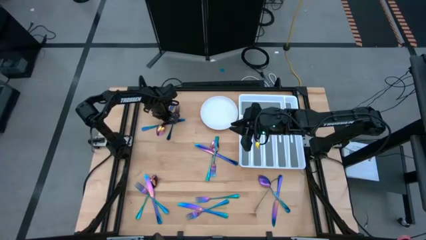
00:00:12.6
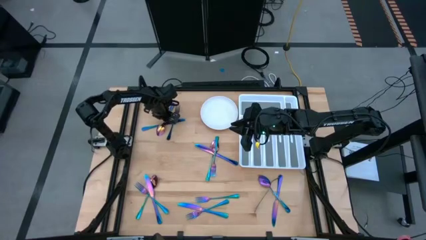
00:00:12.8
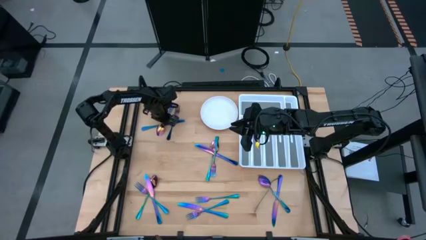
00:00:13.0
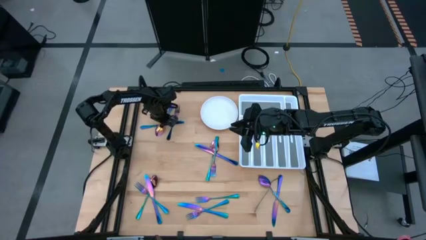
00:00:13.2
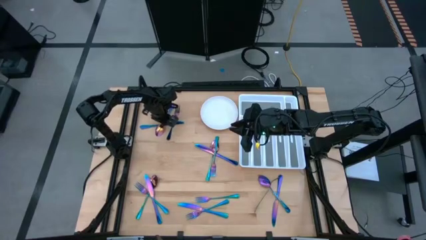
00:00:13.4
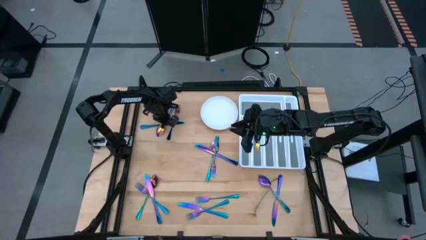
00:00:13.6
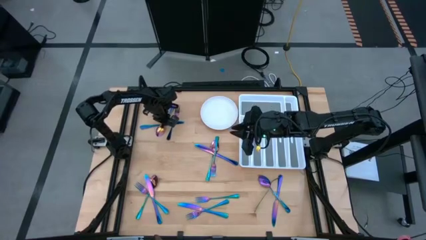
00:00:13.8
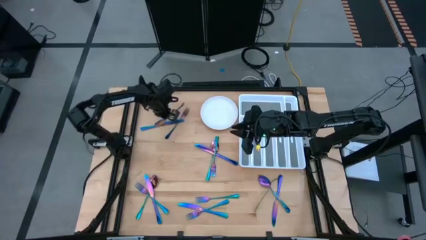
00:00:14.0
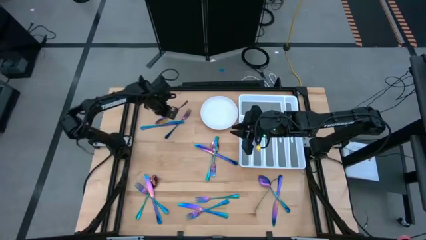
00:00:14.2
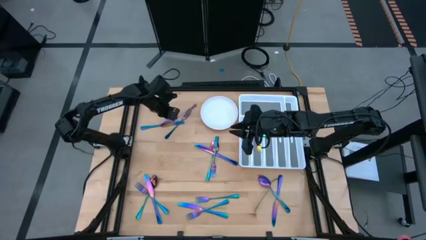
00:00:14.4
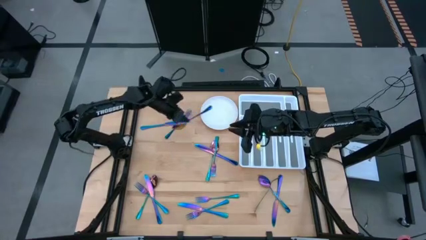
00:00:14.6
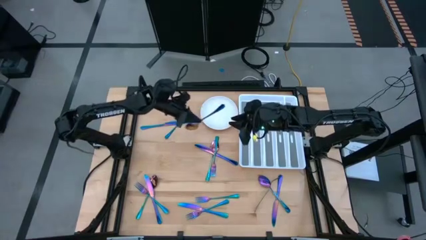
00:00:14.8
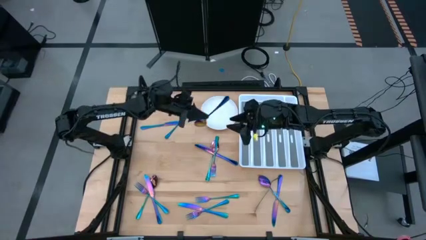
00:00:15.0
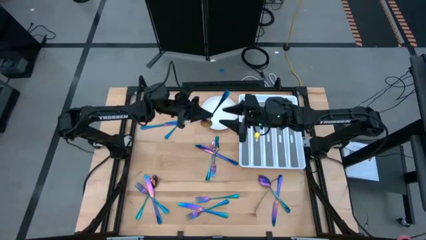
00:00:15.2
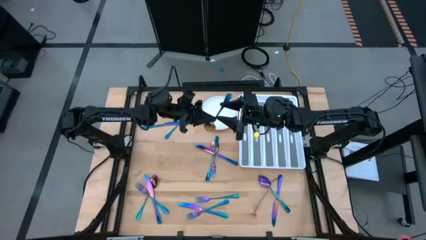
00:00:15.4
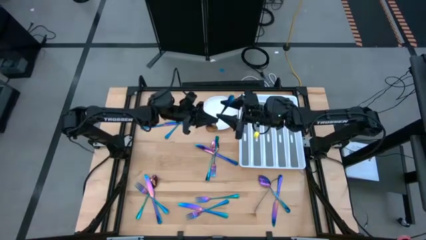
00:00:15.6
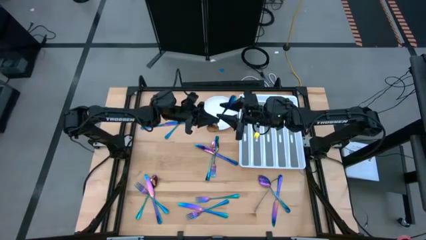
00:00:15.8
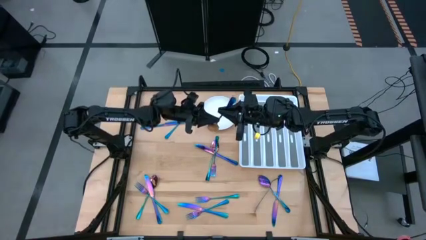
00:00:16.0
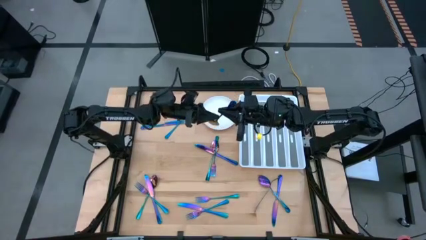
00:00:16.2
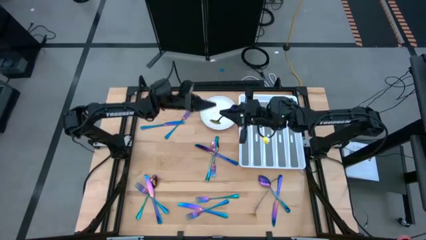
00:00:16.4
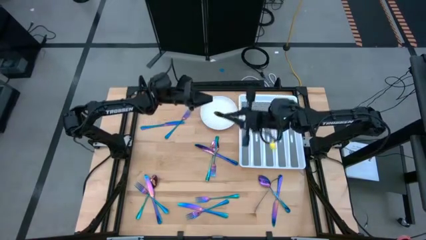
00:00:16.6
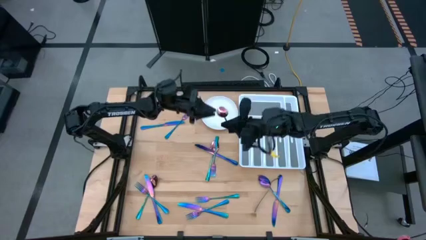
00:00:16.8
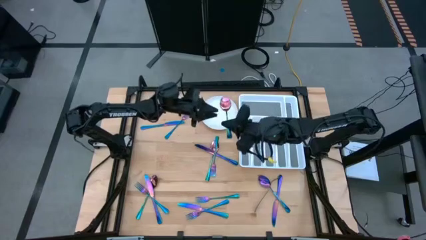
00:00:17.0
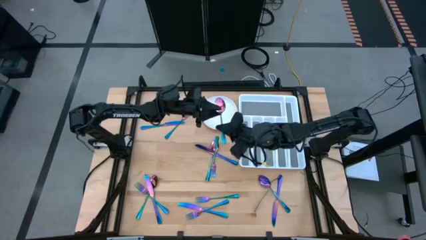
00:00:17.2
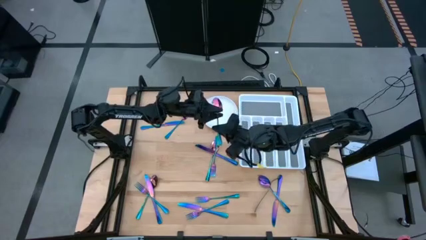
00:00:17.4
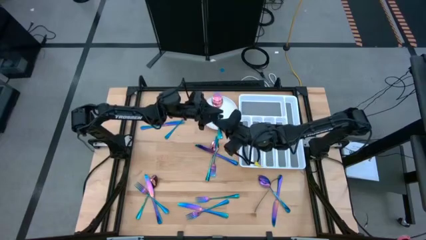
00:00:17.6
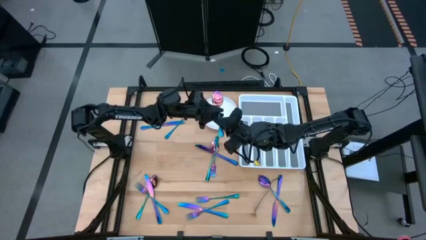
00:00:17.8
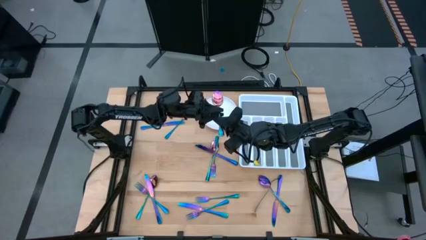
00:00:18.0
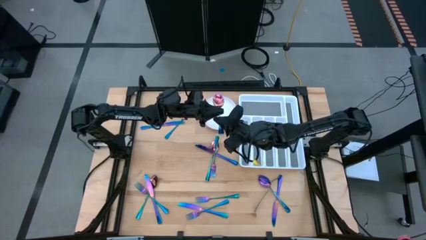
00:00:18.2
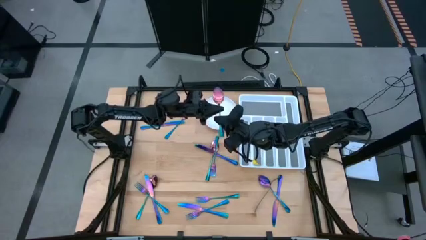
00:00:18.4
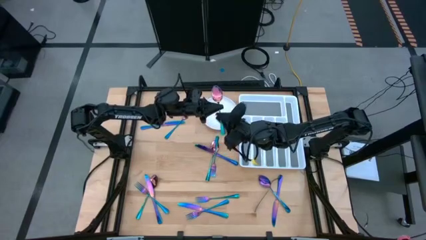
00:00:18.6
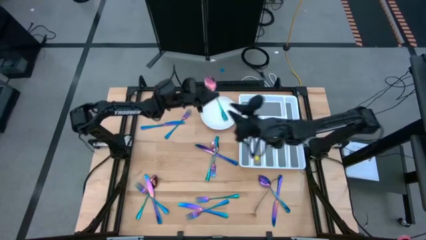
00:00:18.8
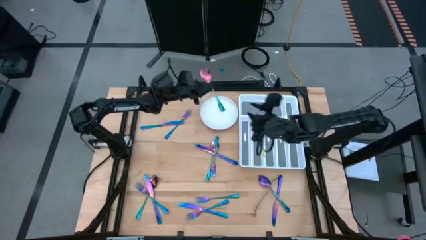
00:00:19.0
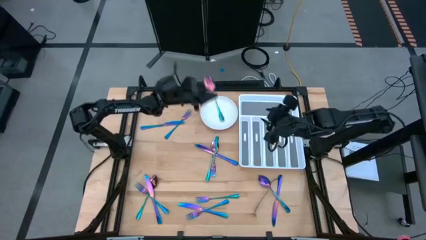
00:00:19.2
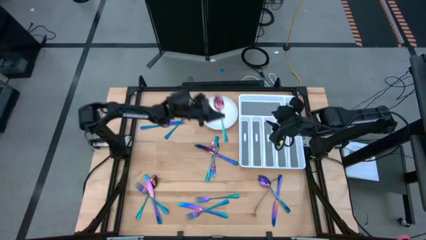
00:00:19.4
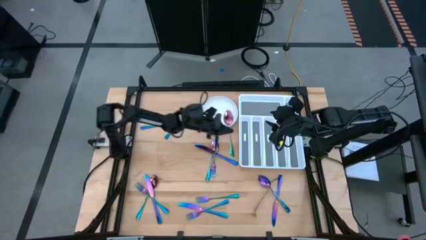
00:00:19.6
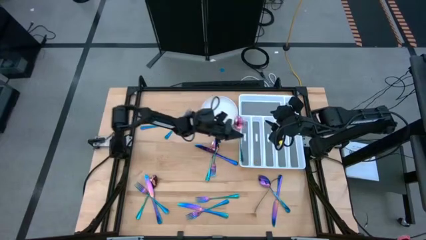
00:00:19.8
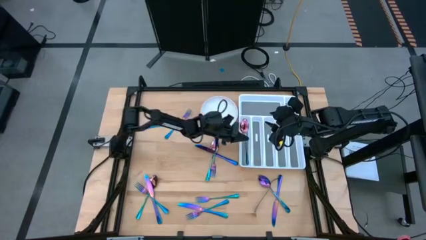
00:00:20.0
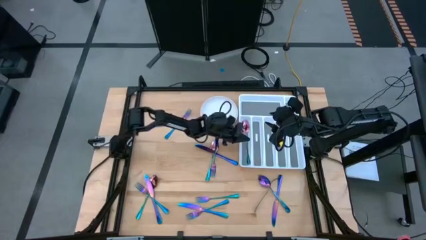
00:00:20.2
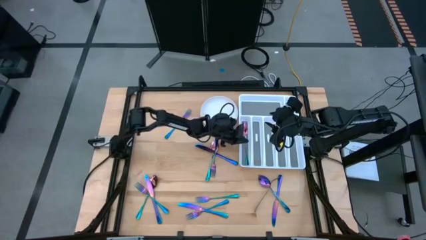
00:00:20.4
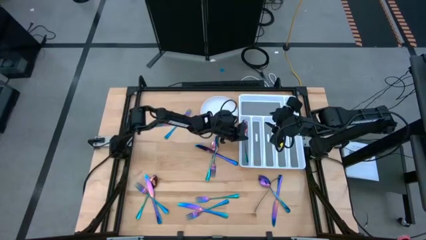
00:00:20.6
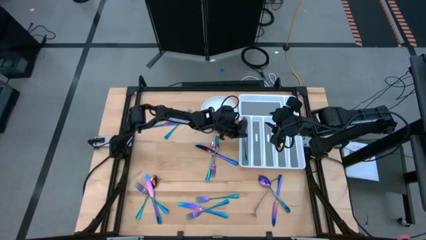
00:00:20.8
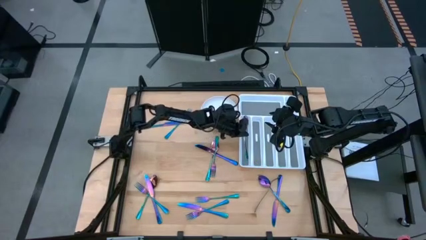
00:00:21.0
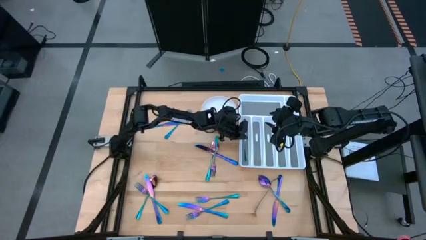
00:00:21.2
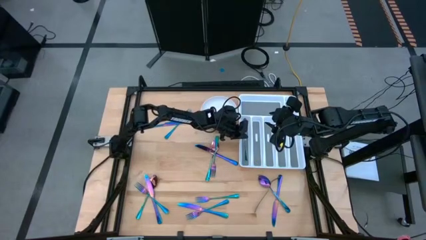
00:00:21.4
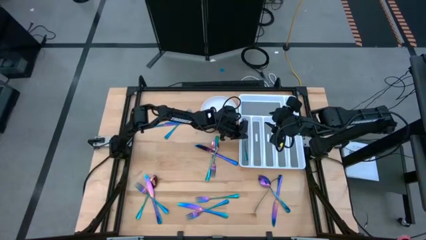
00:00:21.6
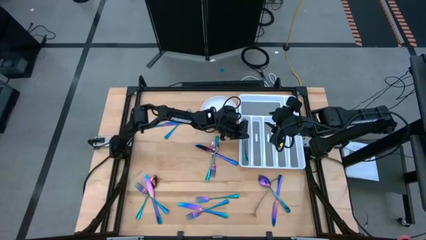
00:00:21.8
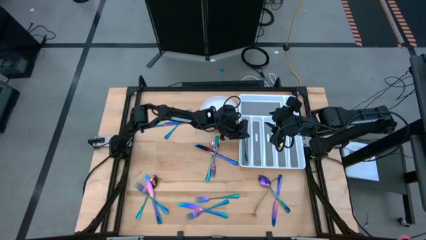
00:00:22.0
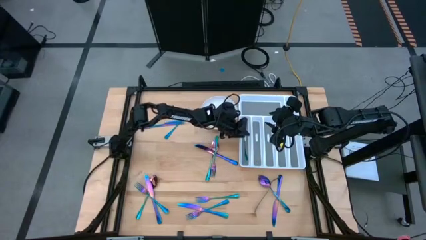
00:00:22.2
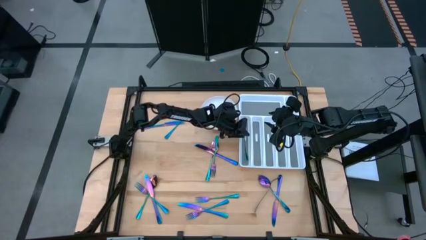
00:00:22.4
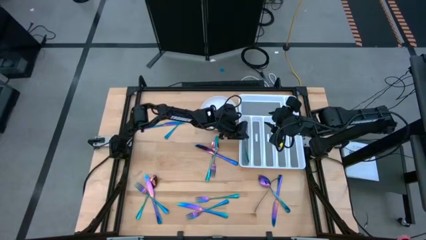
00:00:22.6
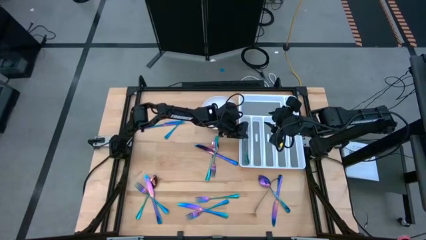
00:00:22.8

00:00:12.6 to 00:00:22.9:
Task: Sort silverware
Put the purple spoon into the white silverware tray

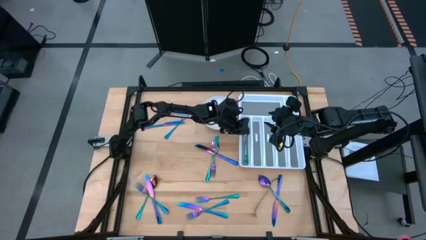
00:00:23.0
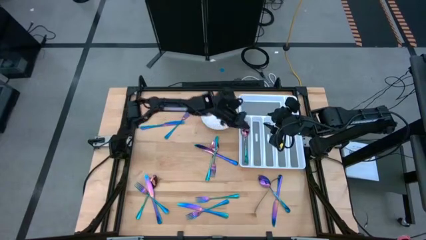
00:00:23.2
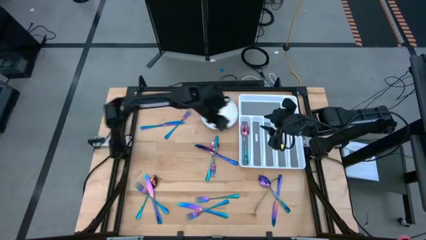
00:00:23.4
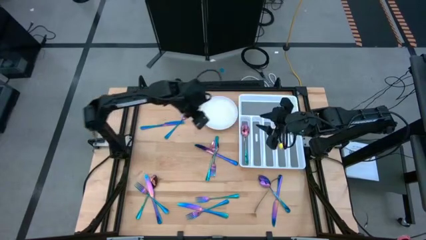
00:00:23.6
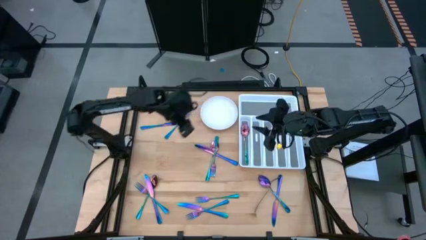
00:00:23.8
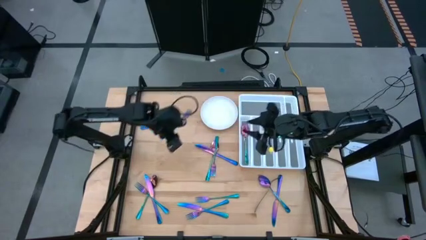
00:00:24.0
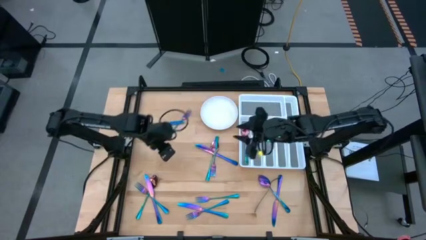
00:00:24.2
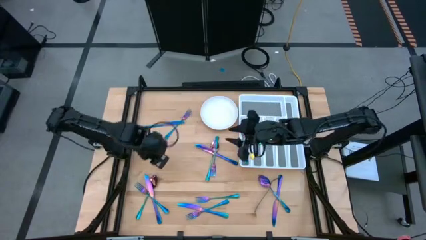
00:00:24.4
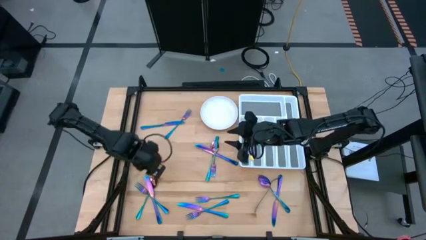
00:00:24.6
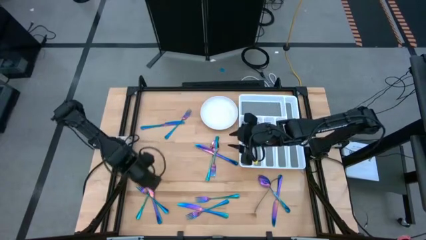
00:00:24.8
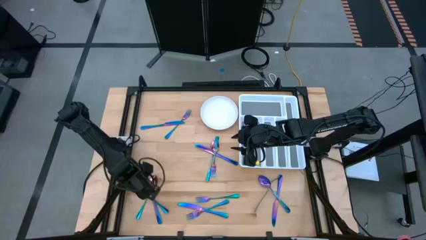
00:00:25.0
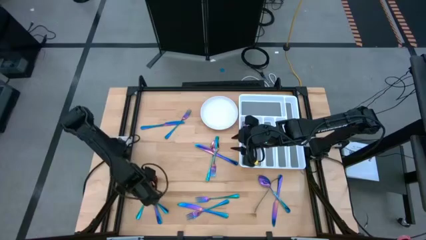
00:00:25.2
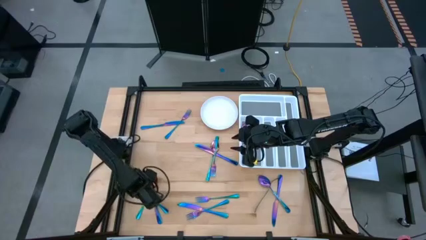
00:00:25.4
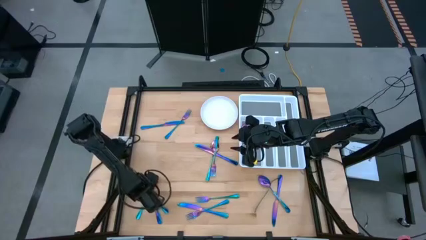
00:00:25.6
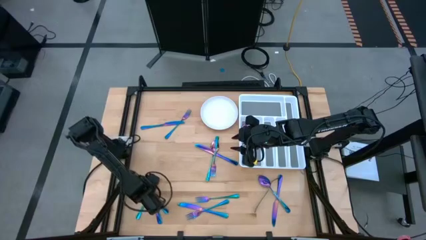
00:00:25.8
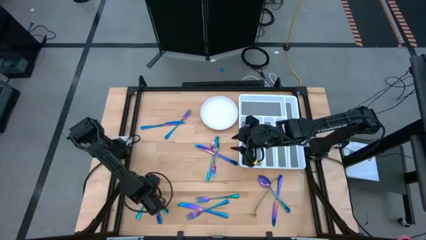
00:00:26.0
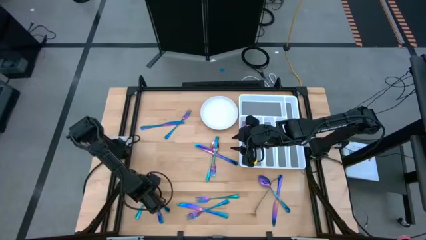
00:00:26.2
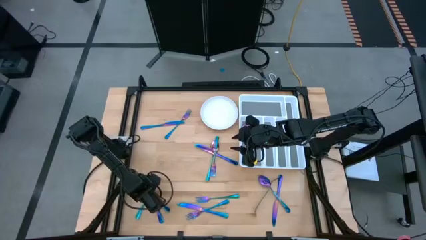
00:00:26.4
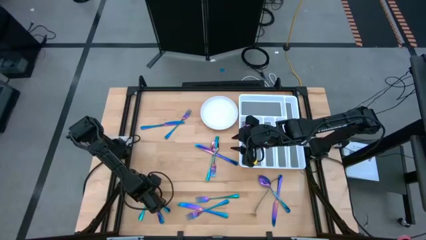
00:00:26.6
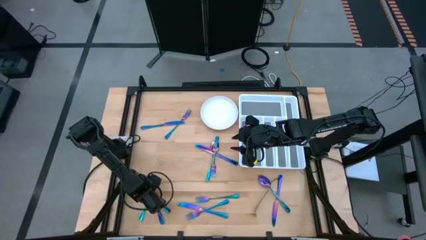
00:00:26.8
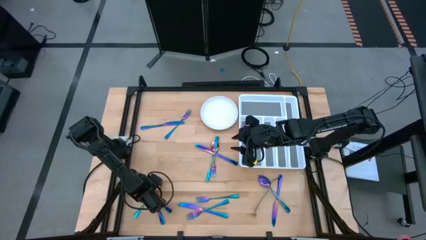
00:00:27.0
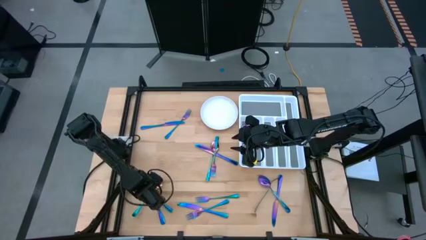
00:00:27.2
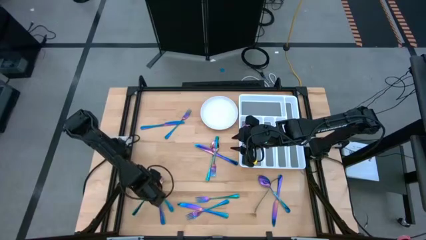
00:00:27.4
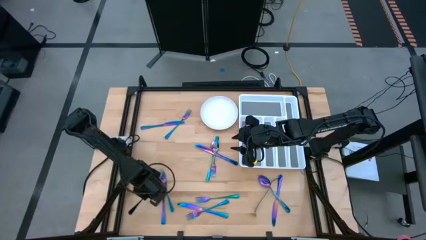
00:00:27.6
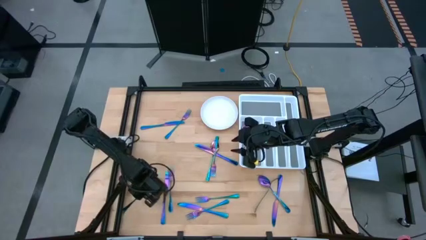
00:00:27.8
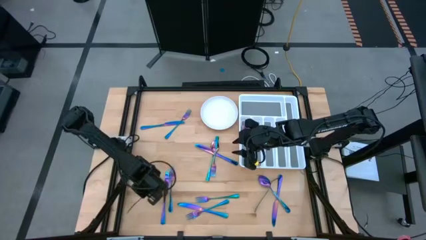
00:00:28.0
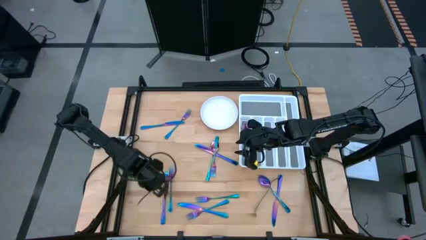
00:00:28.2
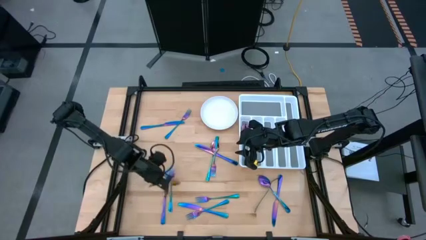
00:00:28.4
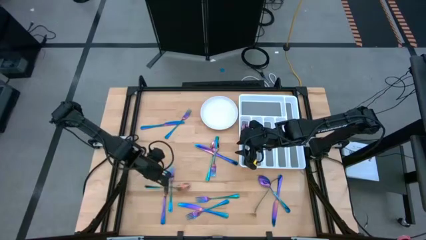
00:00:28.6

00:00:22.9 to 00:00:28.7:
Put the purple spoon into the white silverware tray
